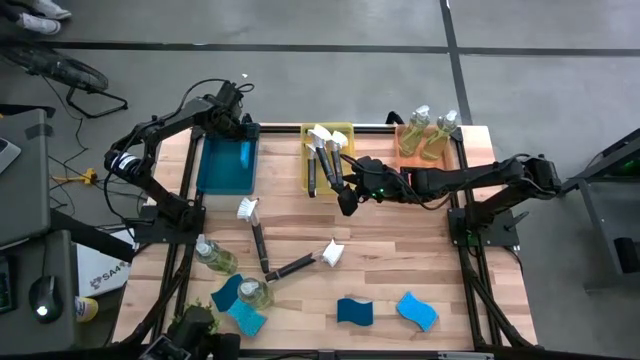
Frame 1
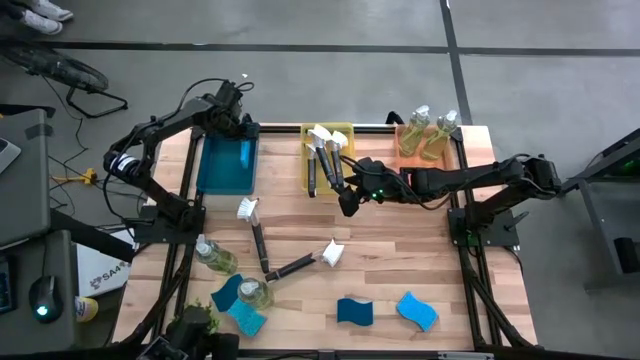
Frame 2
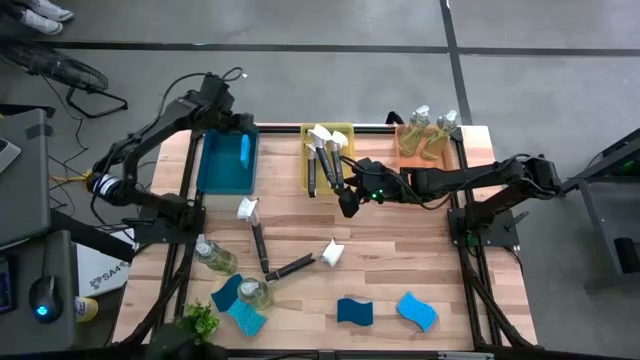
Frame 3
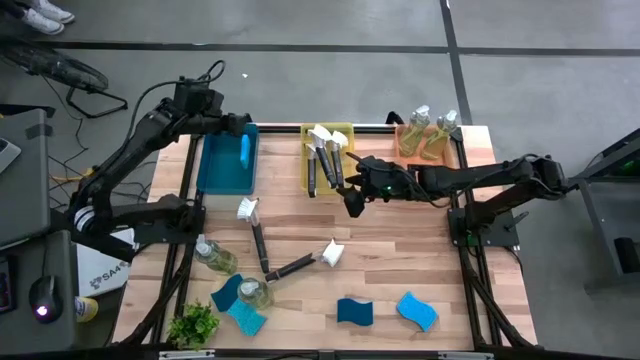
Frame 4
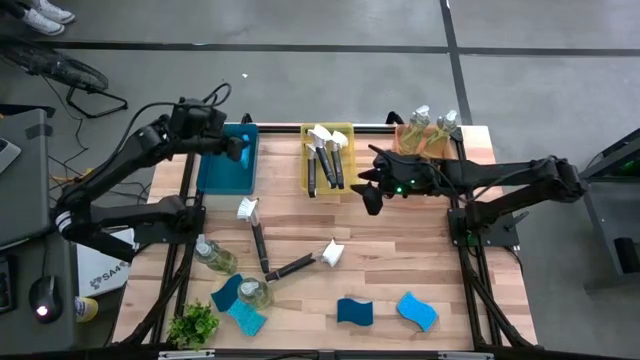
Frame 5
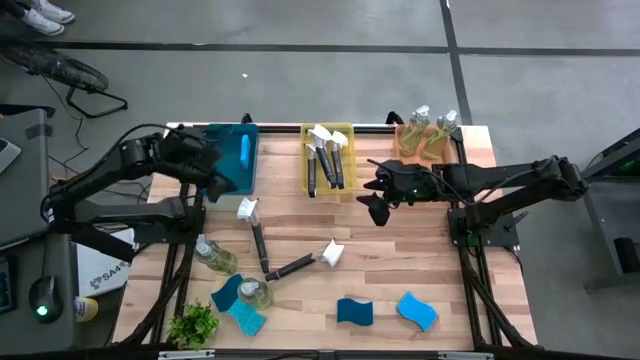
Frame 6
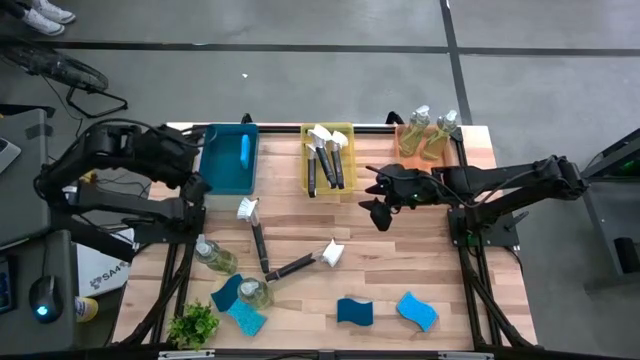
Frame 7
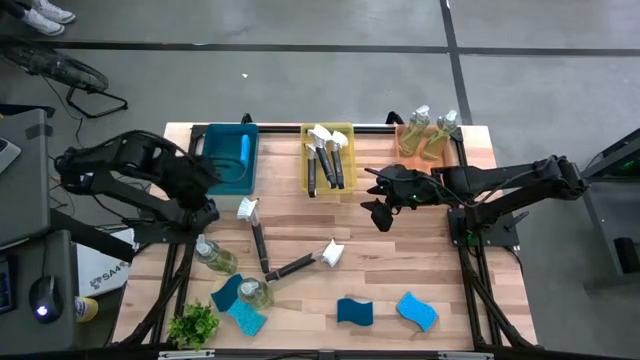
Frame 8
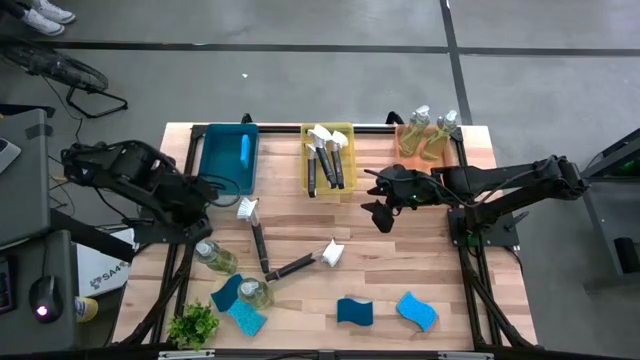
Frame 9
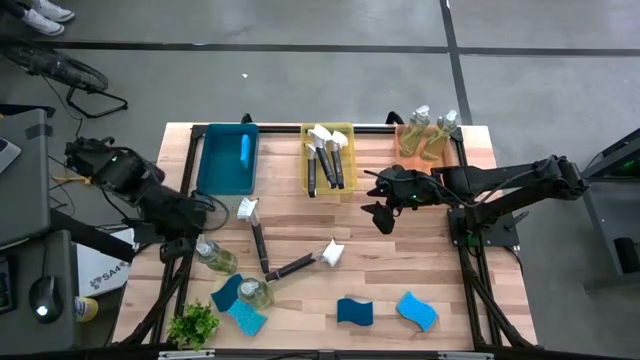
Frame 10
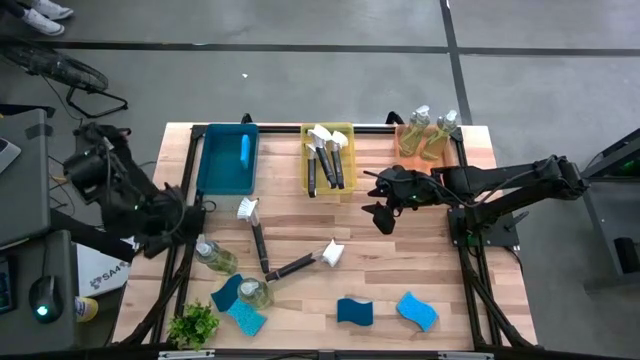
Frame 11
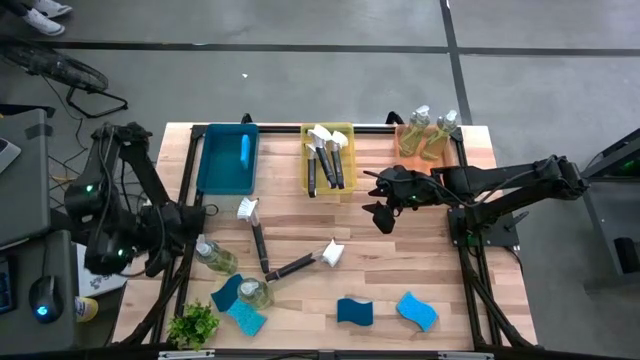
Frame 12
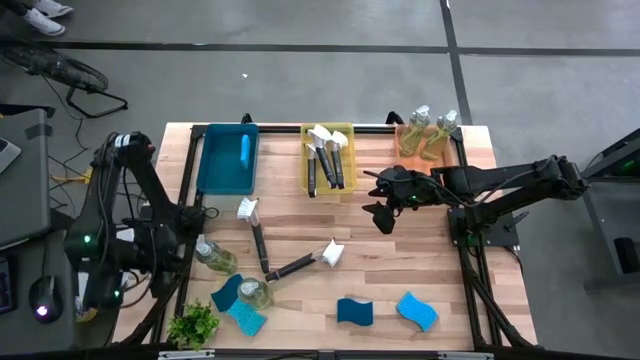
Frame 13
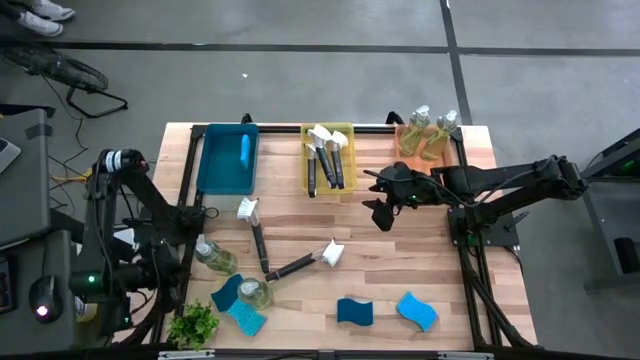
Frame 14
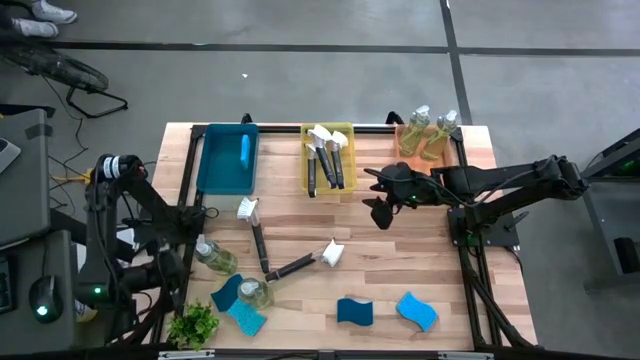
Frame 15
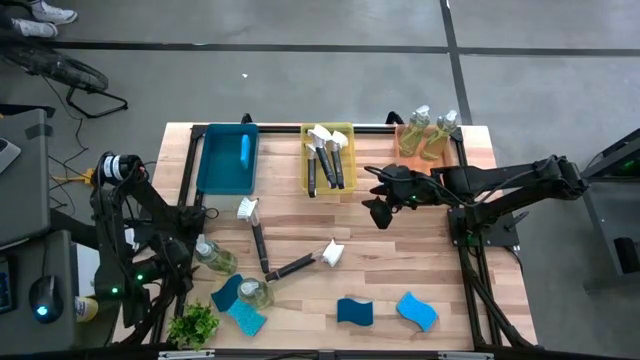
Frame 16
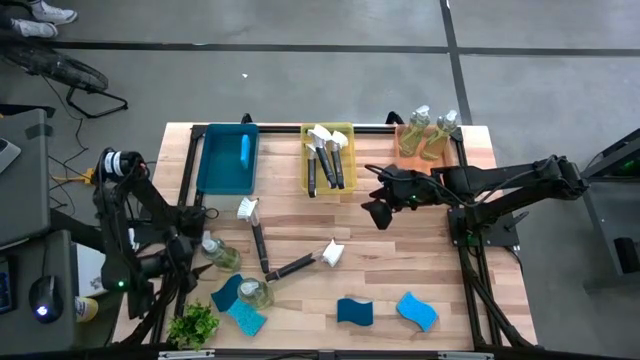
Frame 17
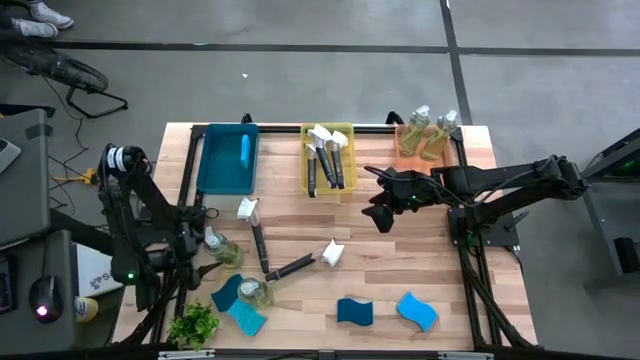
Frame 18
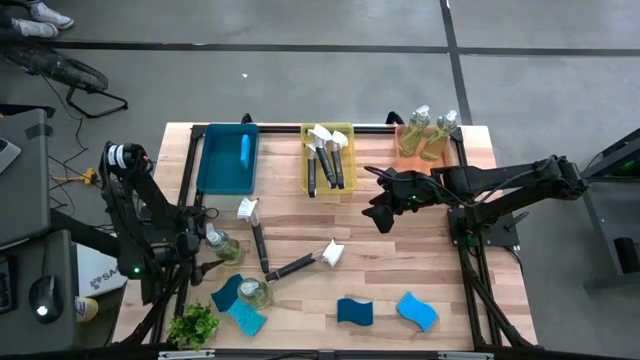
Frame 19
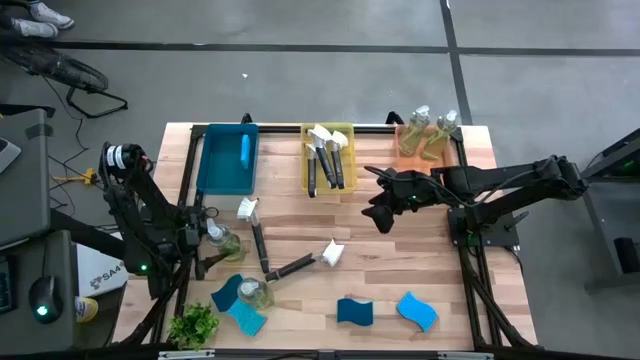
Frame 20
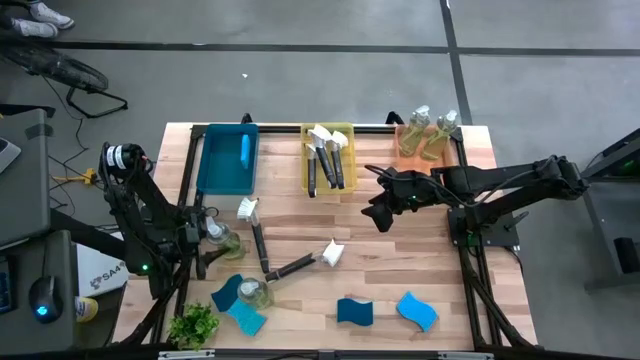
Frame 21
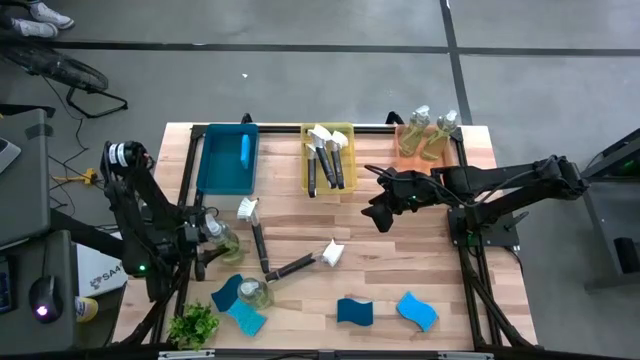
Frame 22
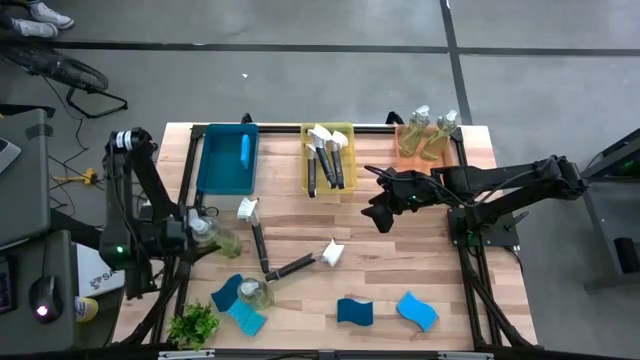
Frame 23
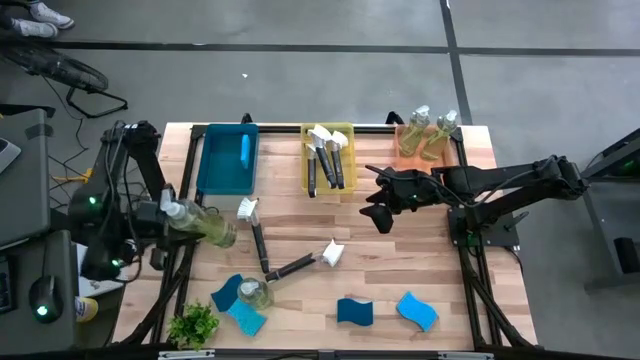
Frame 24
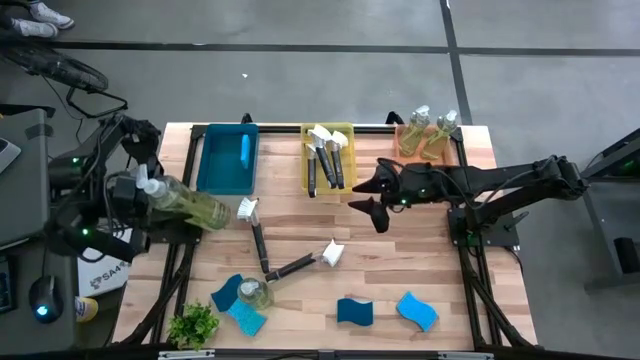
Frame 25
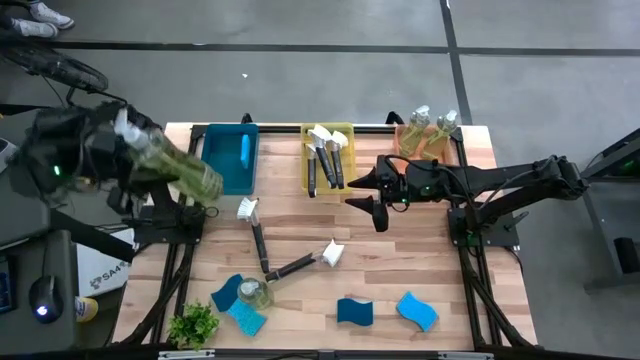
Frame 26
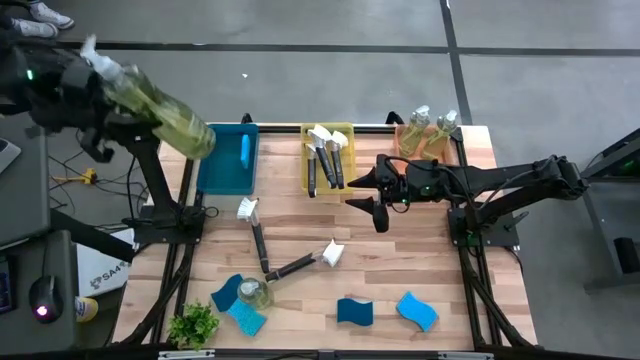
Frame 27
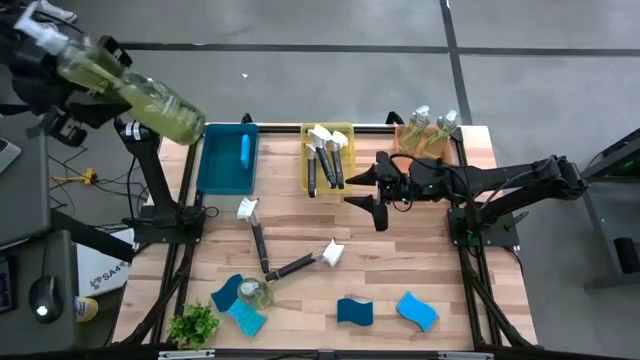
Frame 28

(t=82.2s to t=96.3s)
Task: Pick & Place Kitchen Sink Supplies
Put the green dishwashing liquid dispenser into the orange bin
